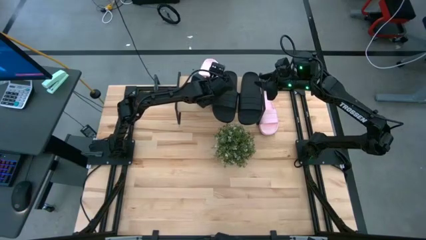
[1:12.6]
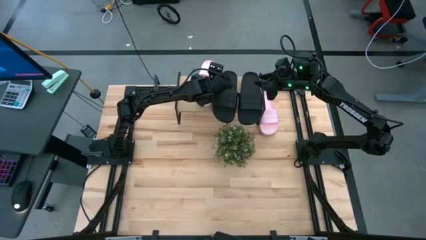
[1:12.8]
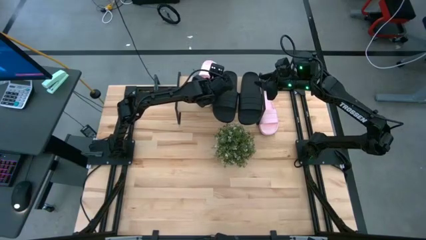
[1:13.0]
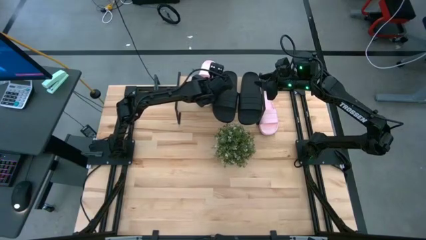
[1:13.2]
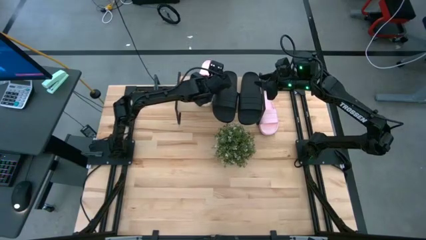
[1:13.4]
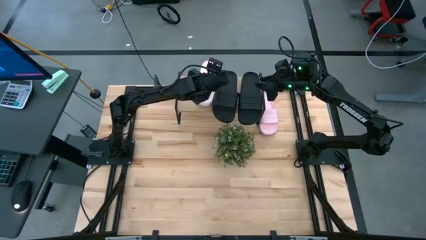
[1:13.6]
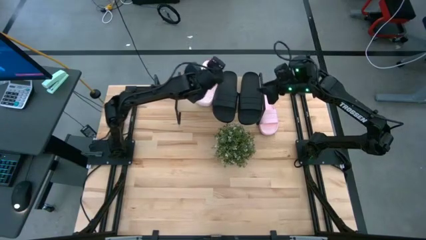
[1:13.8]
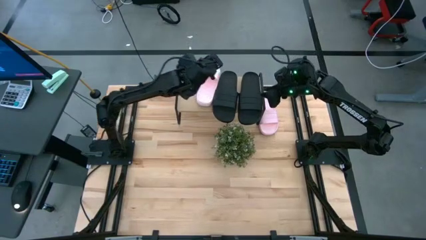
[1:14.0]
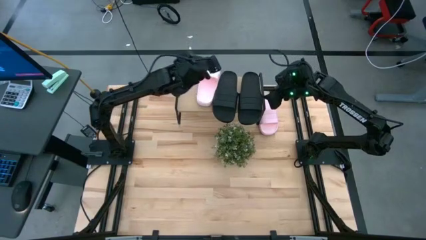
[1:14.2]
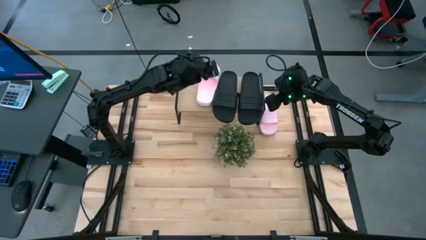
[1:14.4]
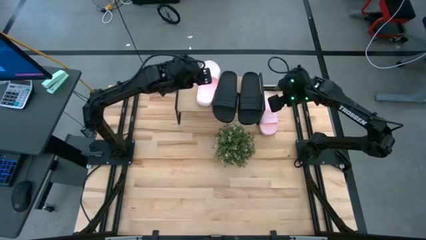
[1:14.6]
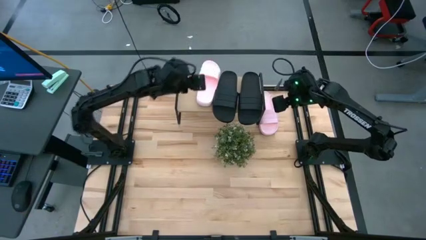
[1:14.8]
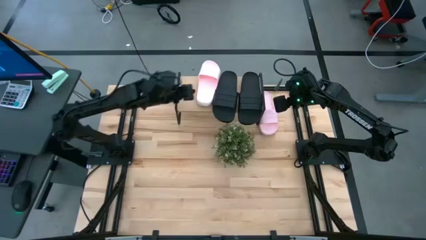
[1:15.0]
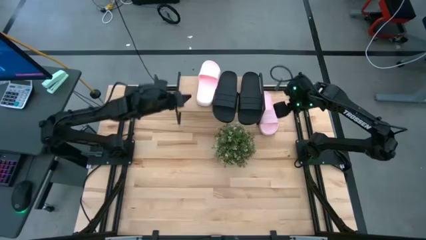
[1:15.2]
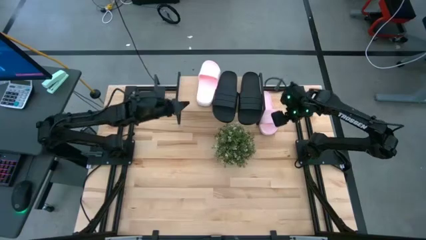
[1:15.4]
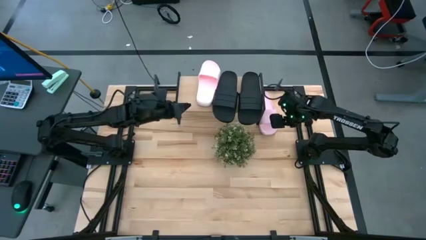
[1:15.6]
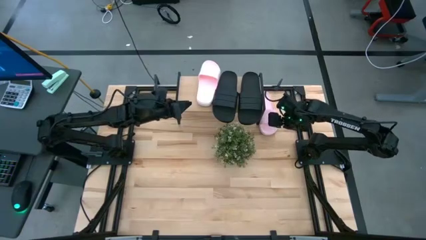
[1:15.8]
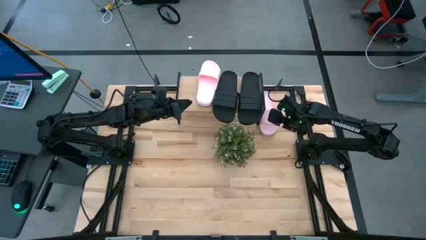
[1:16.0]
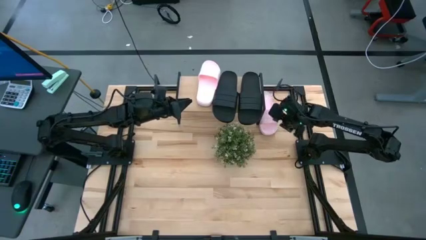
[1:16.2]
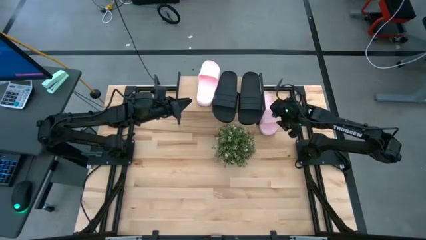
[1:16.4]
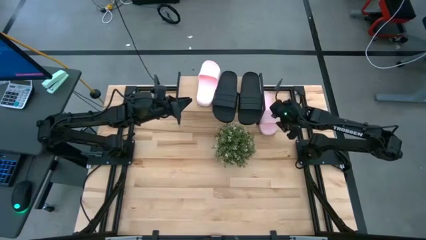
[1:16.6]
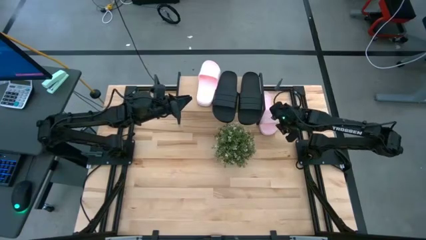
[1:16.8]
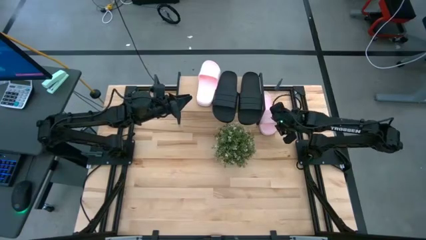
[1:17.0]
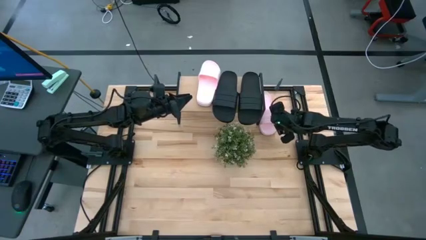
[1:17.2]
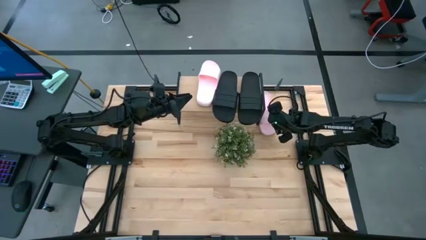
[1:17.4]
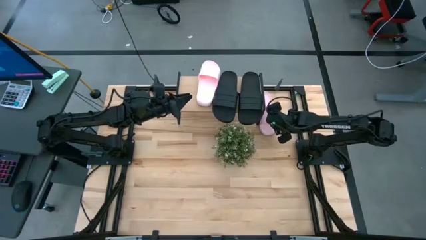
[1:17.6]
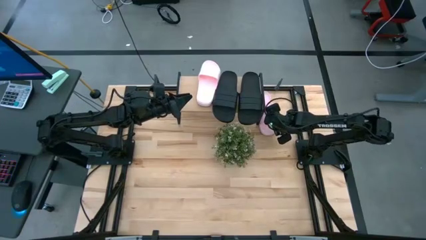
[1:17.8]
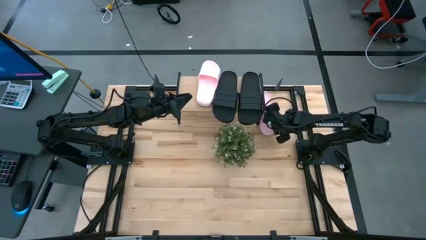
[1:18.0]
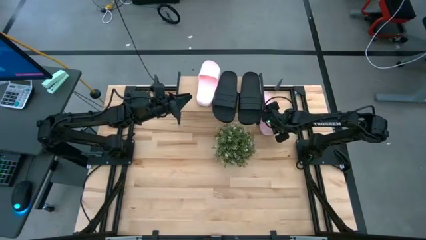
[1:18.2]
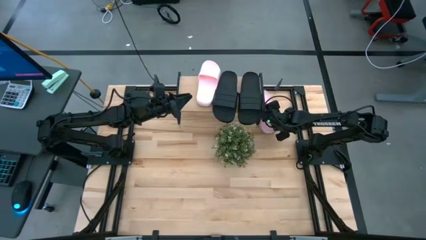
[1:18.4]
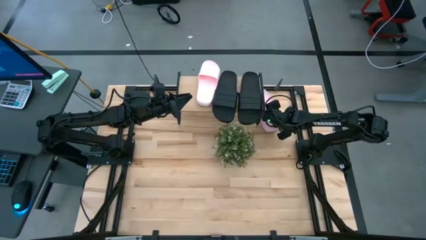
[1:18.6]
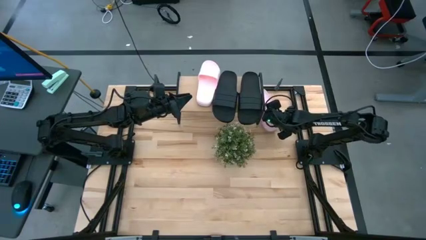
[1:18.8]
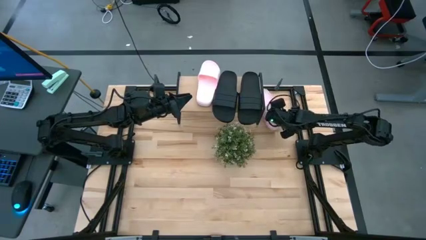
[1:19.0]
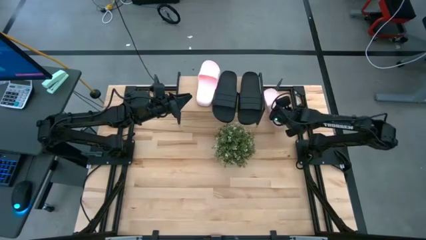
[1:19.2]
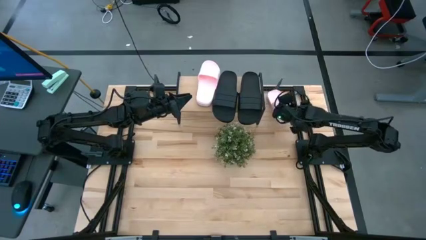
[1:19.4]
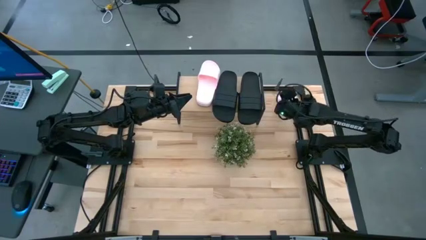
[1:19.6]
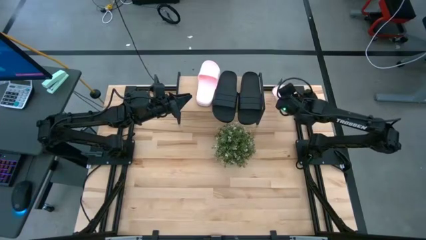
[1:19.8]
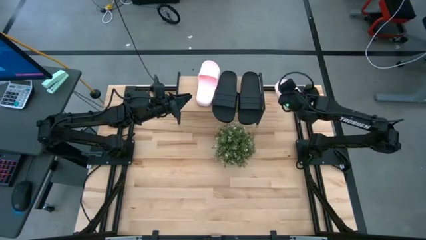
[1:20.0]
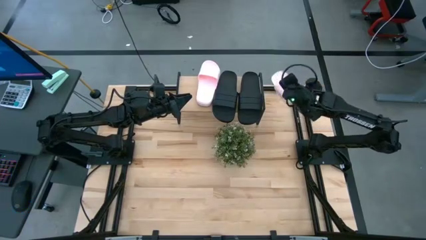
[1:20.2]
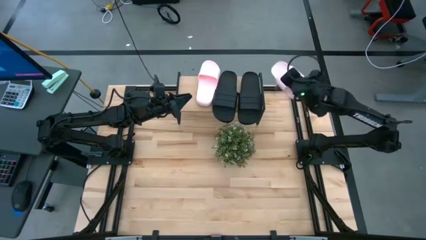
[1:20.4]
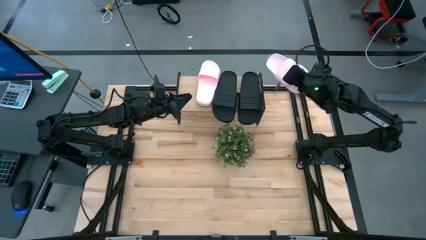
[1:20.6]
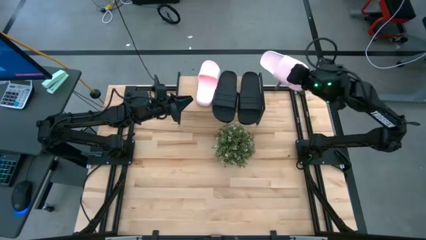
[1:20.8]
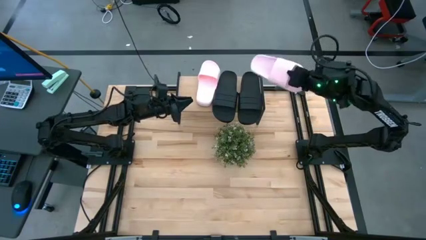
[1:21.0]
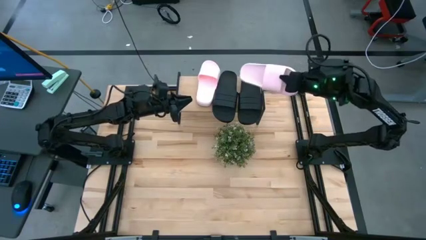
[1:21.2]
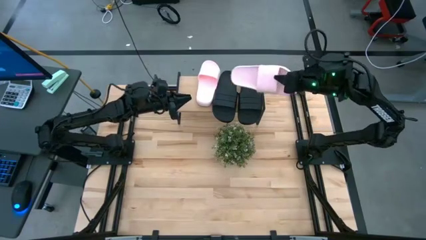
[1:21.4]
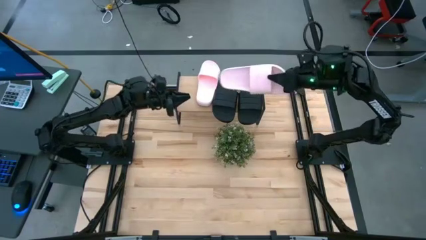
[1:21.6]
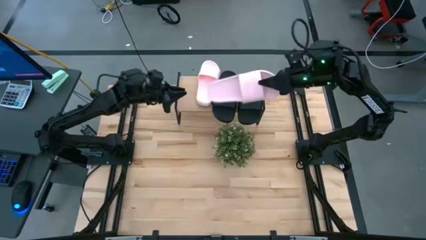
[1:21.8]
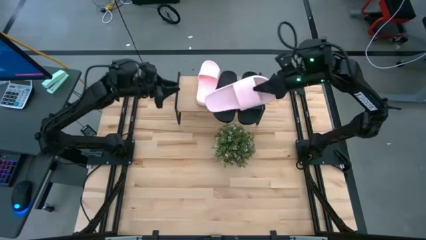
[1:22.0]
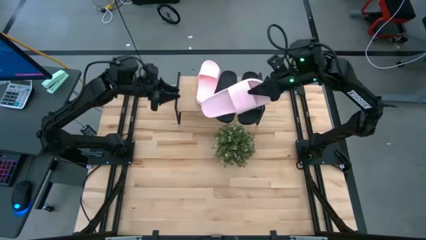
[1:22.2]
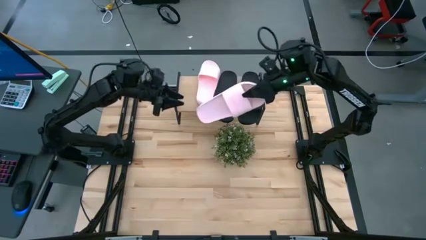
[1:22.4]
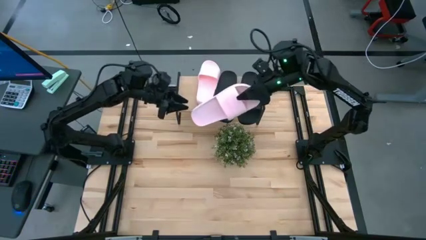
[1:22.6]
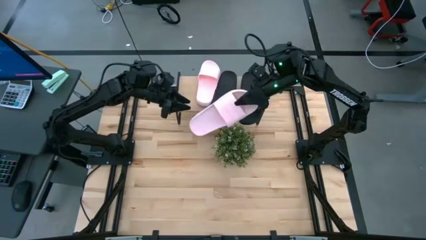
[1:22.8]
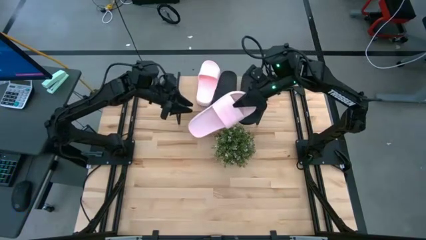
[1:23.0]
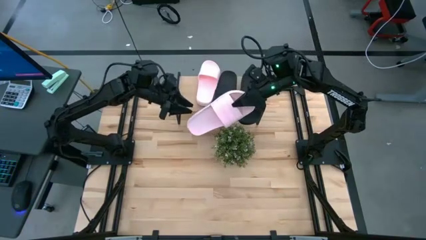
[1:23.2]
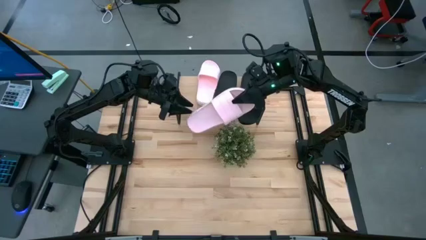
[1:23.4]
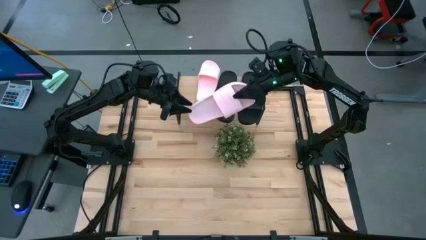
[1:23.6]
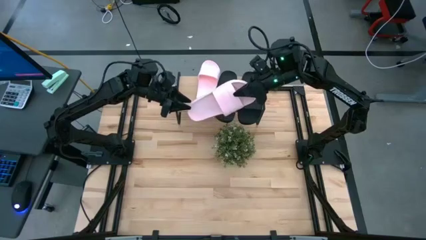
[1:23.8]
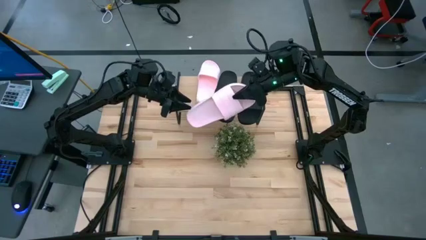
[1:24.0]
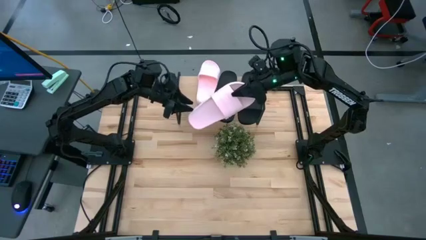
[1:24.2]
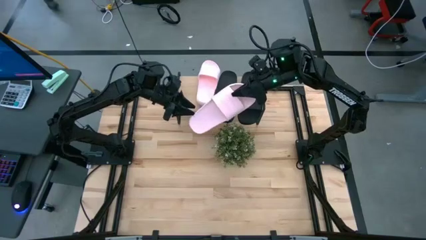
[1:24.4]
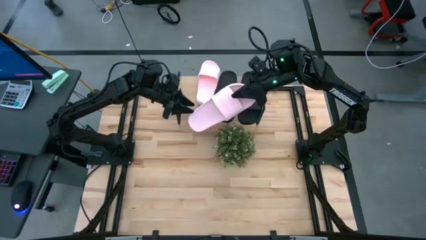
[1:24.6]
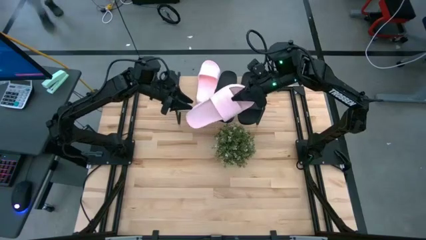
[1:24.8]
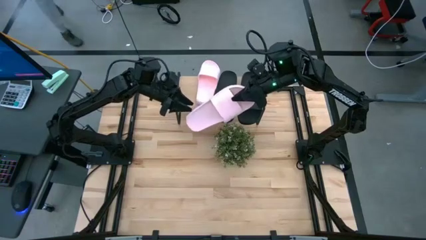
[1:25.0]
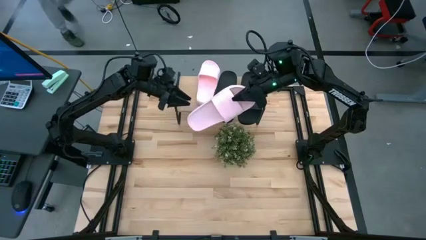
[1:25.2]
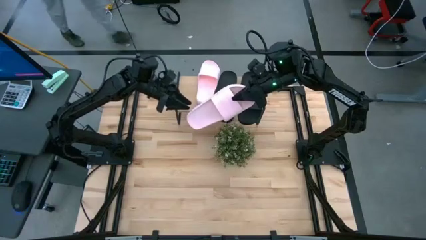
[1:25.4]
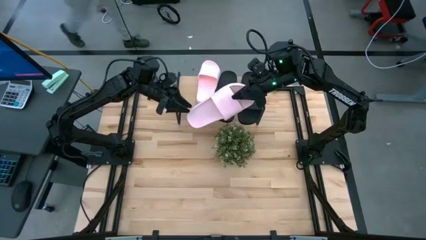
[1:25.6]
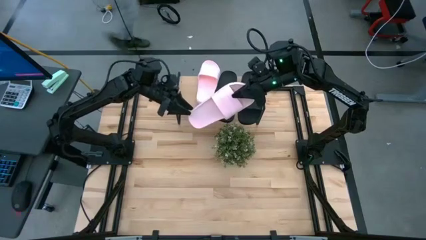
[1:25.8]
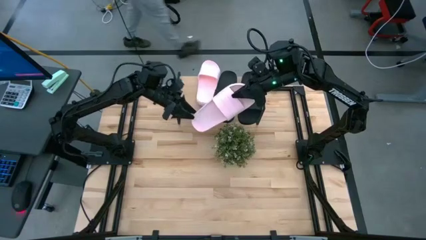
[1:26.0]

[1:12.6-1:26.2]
Task: Pick and place slides into the shelf
Put the pink slipper on the shelf
